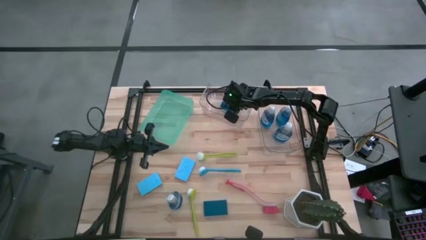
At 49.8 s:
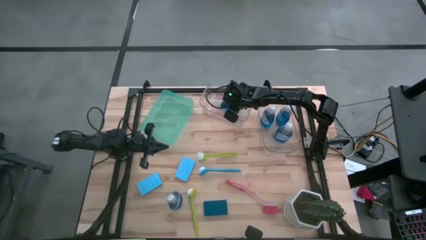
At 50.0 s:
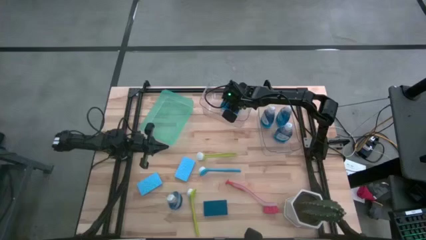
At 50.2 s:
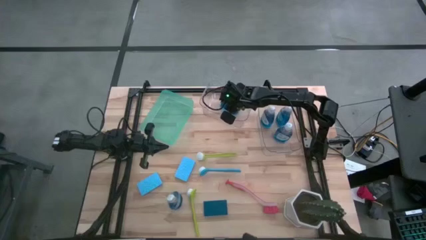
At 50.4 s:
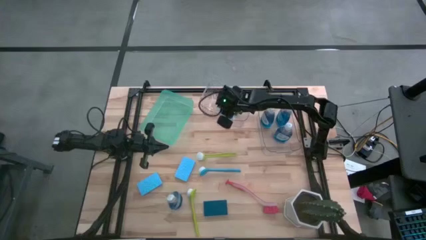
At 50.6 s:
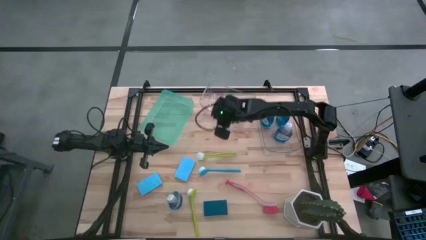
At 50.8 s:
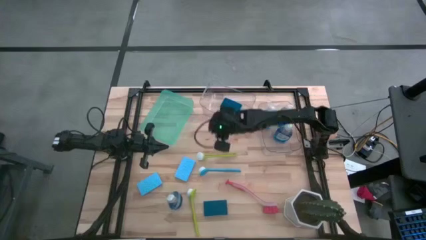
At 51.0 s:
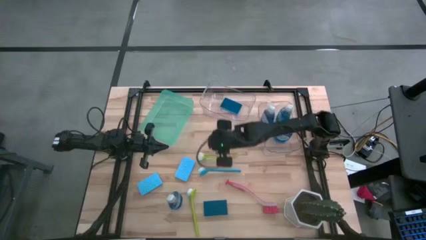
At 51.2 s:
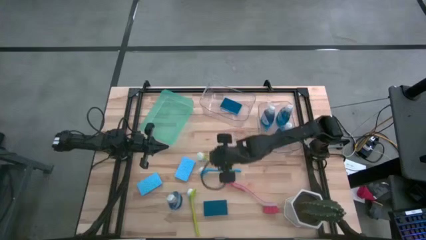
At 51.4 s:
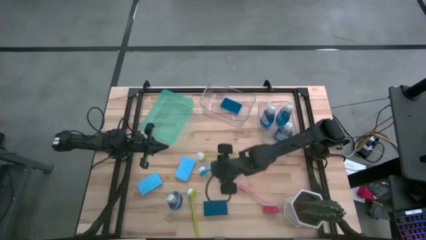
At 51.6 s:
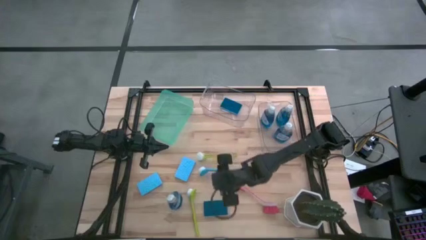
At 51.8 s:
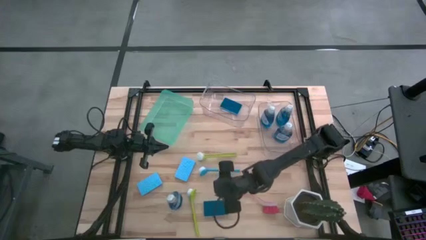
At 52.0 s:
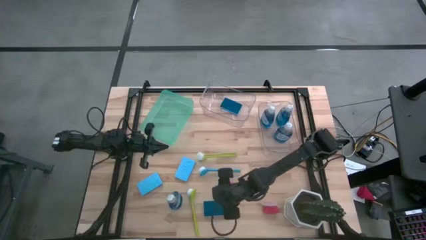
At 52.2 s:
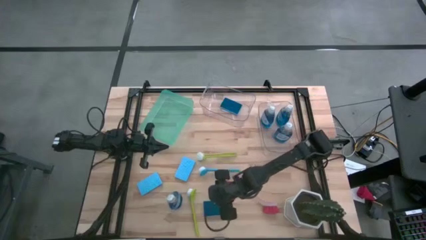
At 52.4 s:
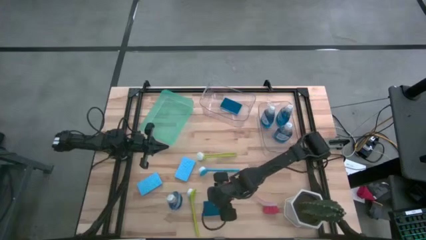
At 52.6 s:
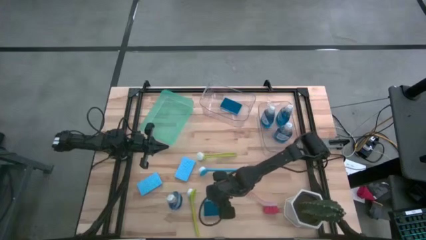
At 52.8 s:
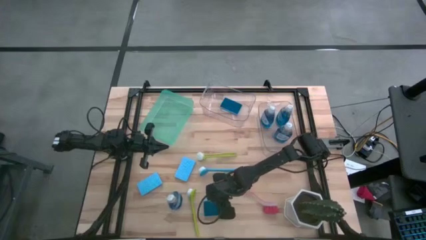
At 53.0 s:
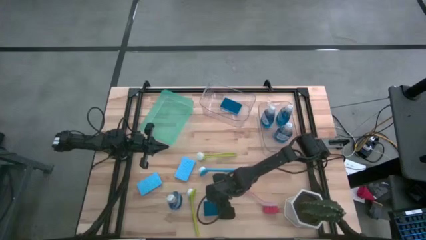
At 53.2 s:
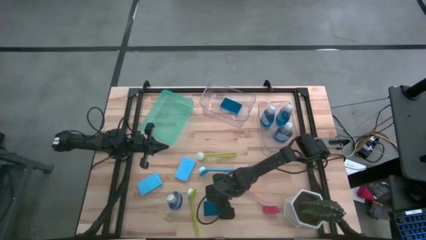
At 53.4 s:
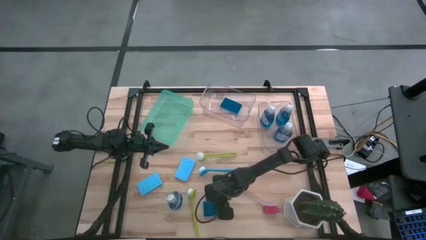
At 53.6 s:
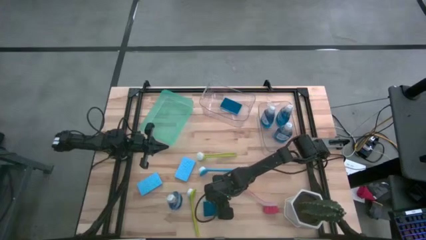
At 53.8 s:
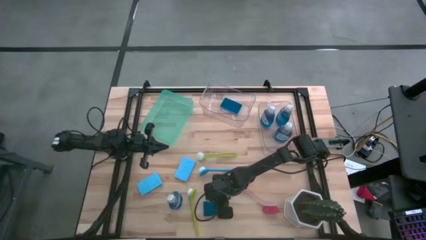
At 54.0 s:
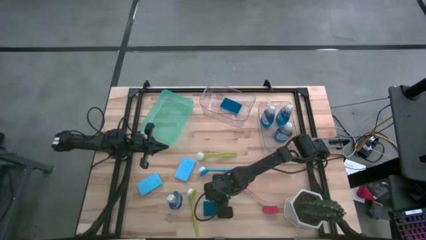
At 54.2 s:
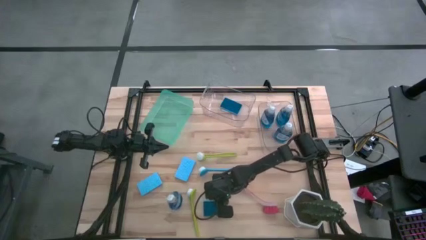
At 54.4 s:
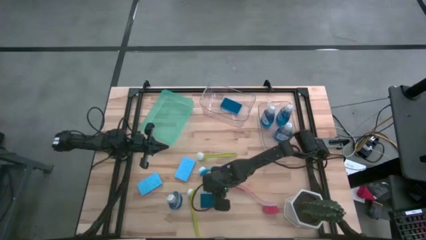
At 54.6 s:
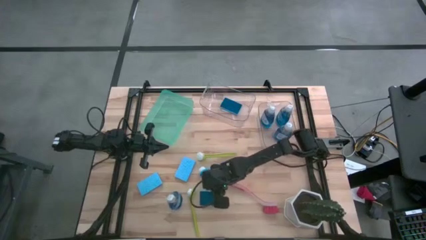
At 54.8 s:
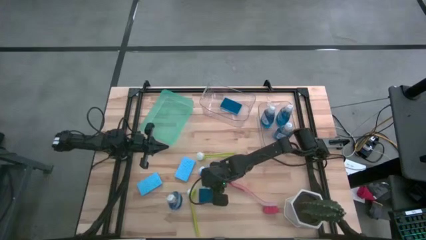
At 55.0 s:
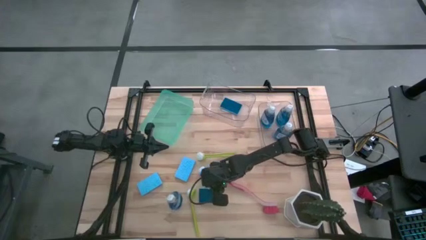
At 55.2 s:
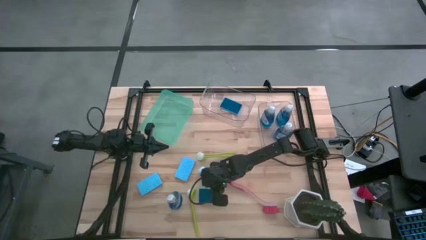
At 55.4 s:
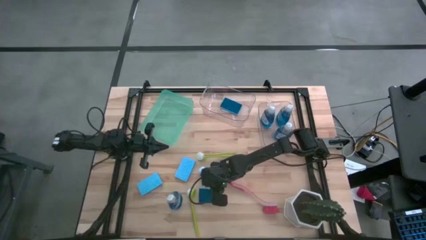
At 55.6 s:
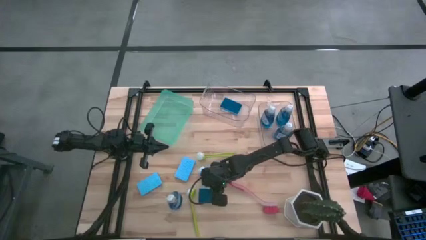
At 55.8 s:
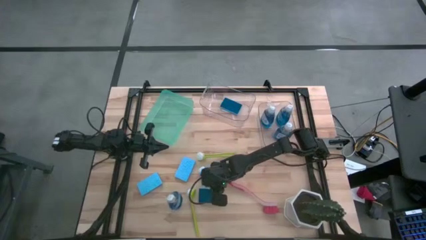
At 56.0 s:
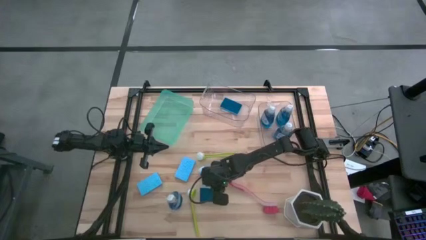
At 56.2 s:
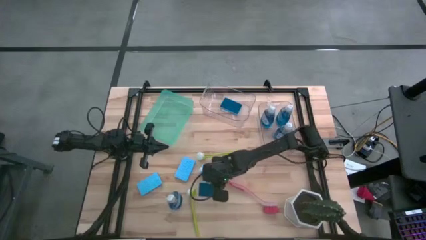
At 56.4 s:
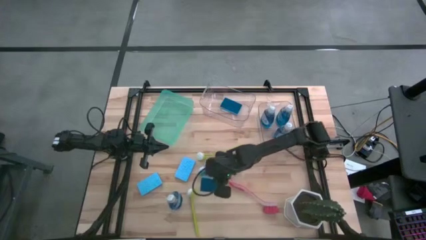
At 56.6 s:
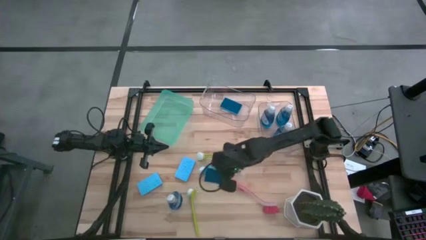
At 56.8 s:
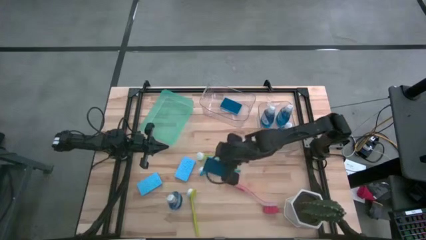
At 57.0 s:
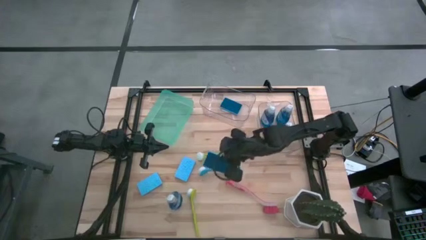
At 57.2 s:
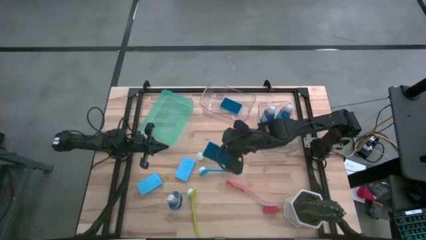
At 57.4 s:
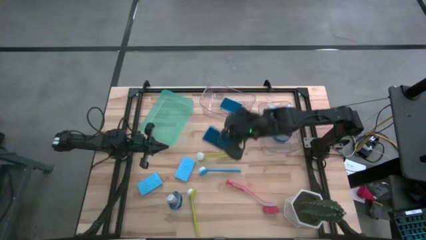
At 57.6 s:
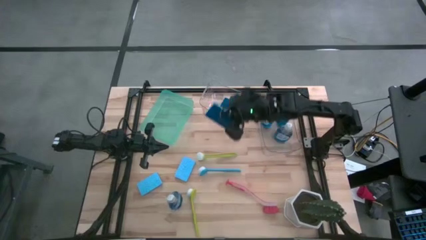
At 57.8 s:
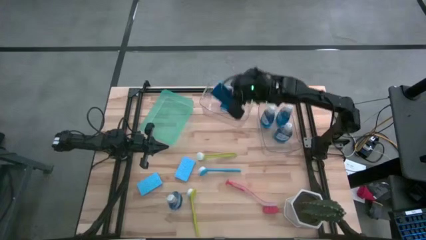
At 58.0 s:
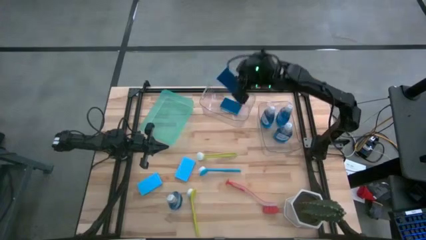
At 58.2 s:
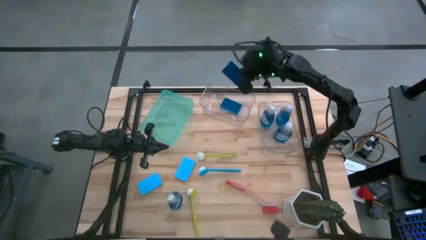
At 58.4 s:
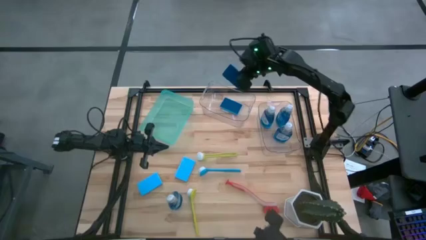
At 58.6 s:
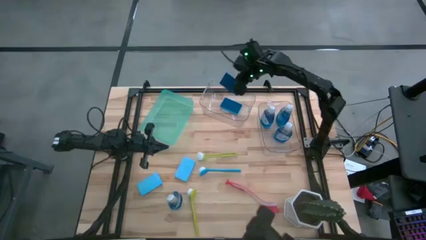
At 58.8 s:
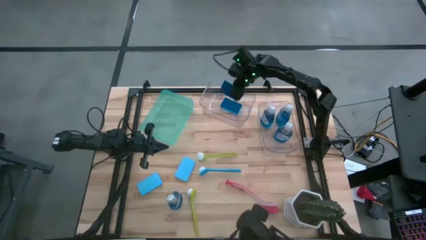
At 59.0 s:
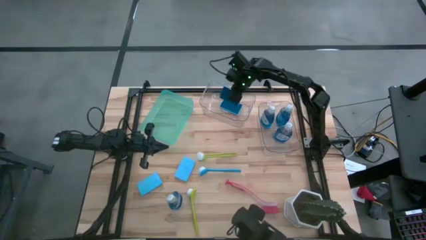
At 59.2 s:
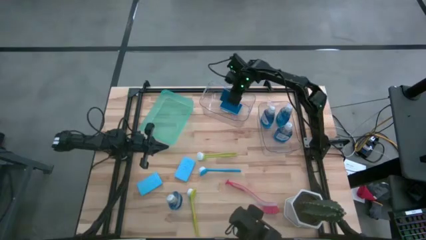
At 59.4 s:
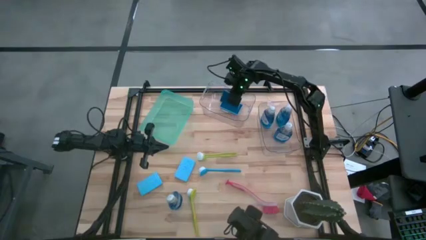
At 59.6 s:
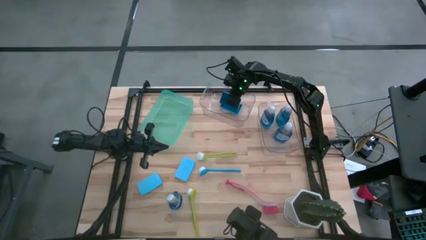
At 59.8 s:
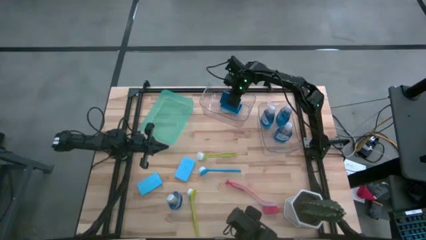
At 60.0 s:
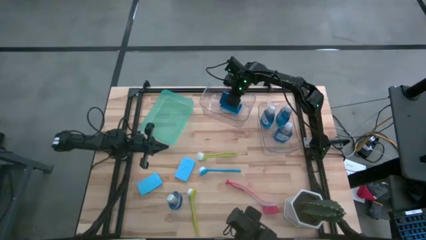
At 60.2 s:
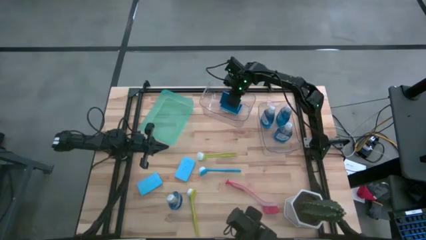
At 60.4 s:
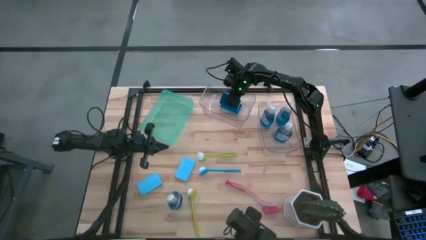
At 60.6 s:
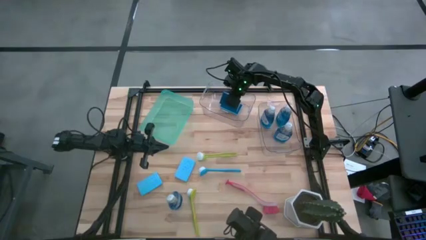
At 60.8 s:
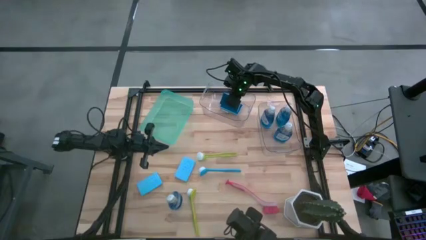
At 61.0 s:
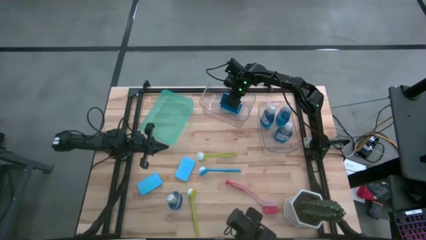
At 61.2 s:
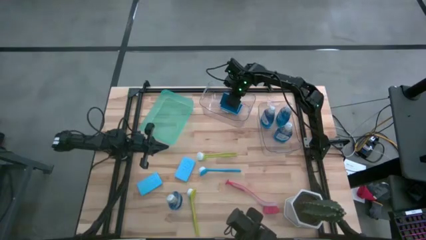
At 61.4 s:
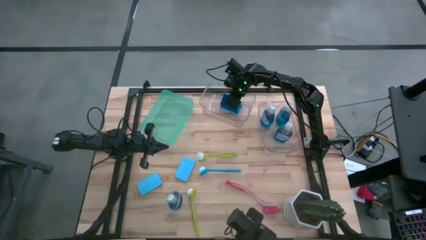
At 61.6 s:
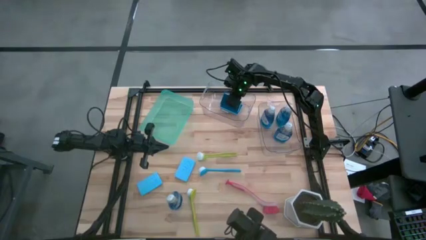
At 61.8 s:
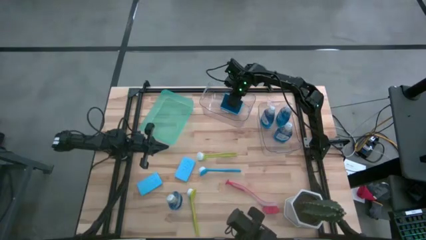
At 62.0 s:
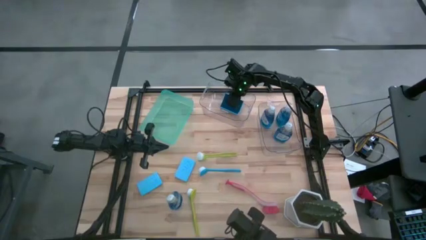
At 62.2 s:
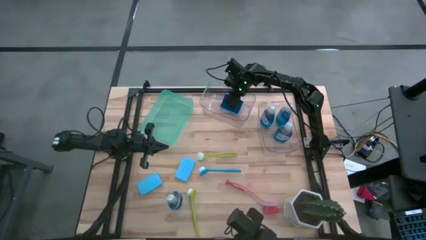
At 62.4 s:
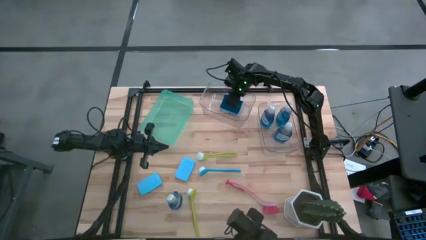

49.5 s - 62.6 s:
Task: Pick & Place Kitchen Sink Supplies
Put the blue sponge wipe into the left transparent bin
